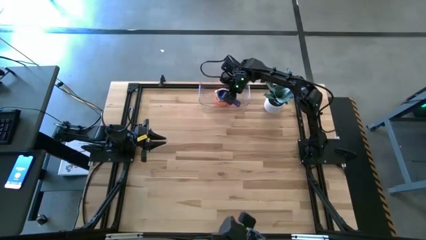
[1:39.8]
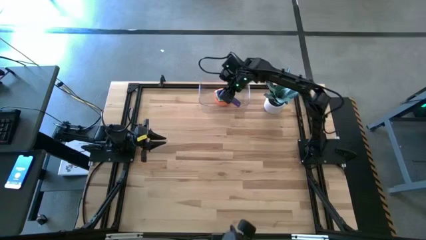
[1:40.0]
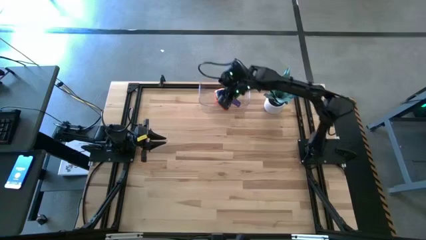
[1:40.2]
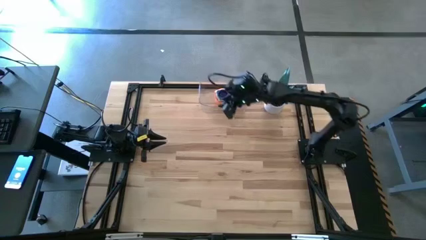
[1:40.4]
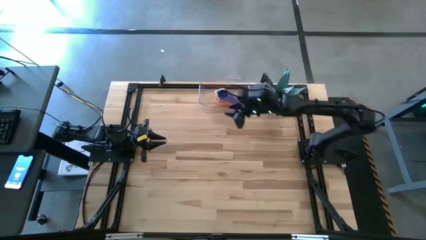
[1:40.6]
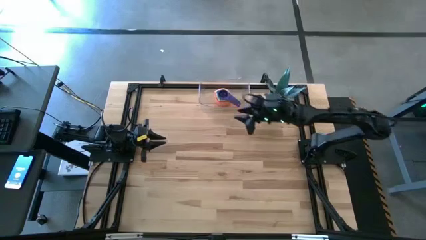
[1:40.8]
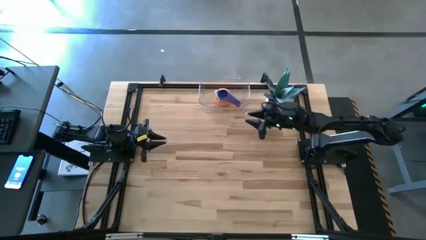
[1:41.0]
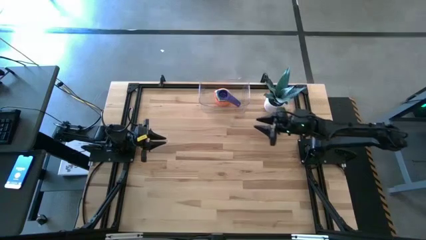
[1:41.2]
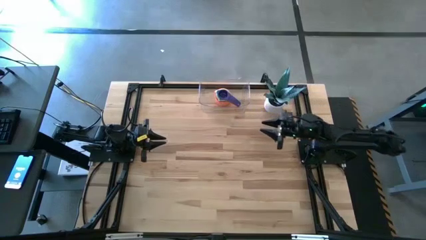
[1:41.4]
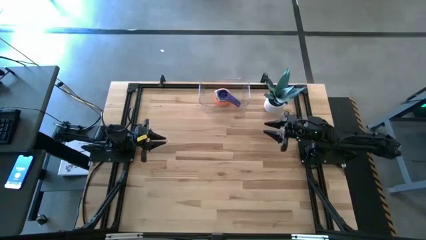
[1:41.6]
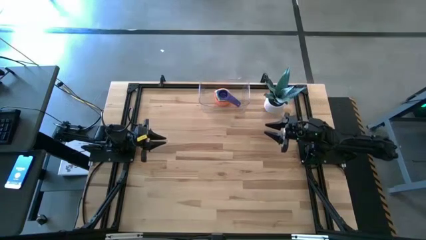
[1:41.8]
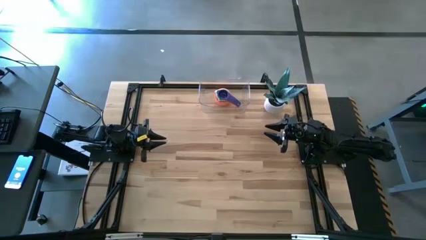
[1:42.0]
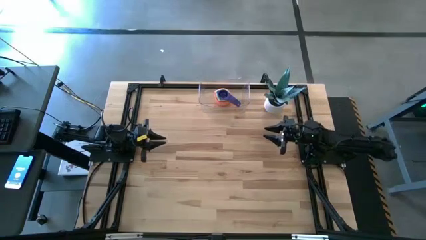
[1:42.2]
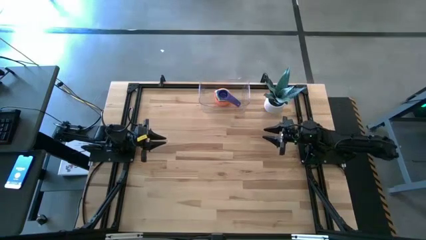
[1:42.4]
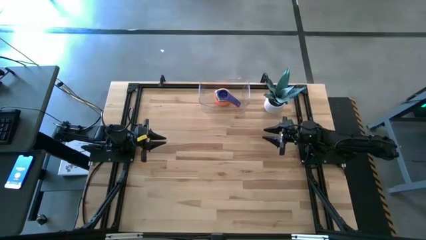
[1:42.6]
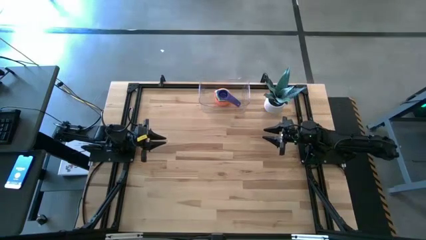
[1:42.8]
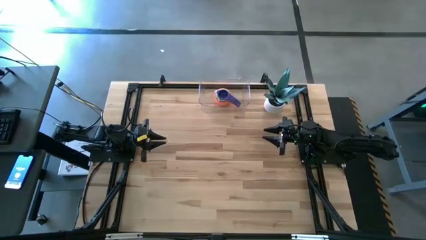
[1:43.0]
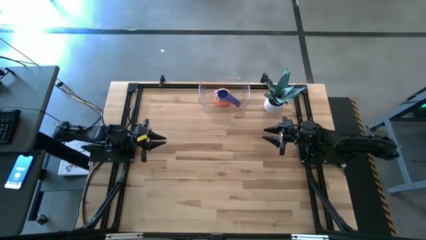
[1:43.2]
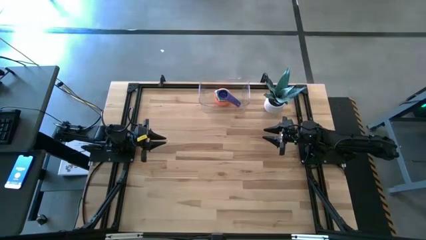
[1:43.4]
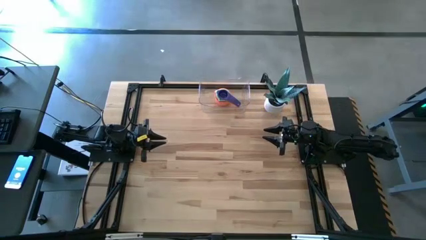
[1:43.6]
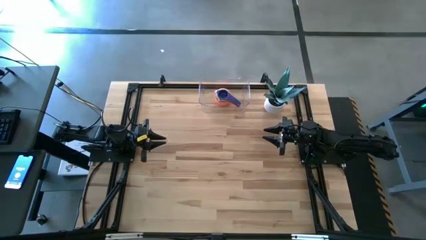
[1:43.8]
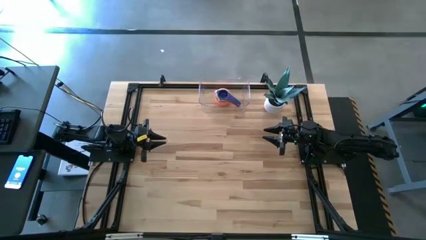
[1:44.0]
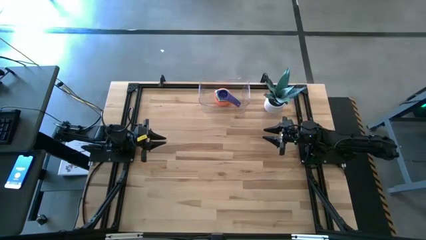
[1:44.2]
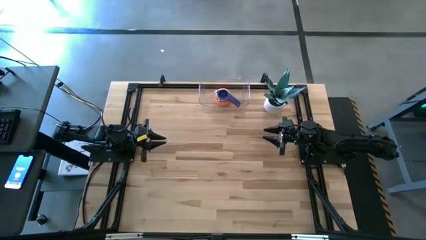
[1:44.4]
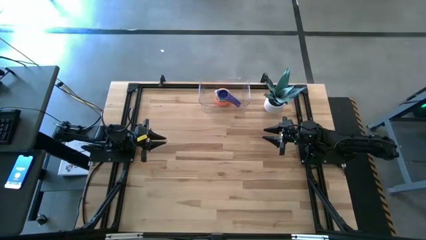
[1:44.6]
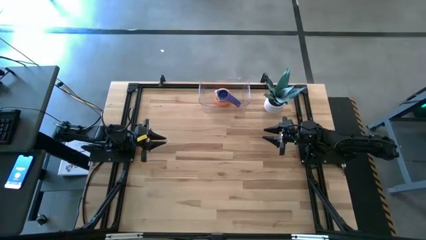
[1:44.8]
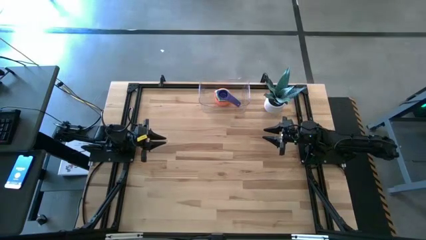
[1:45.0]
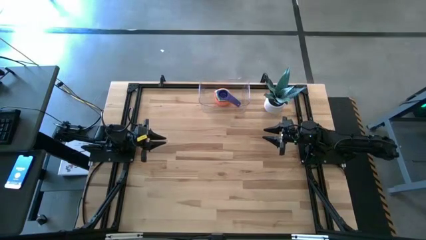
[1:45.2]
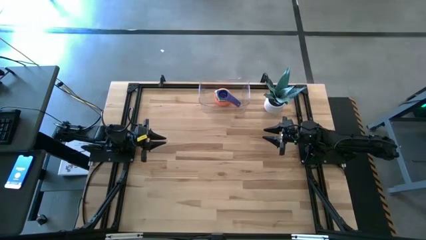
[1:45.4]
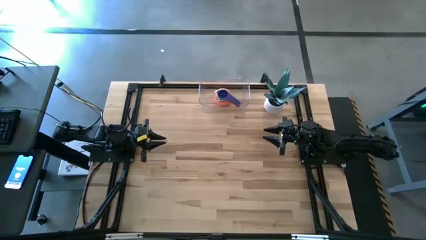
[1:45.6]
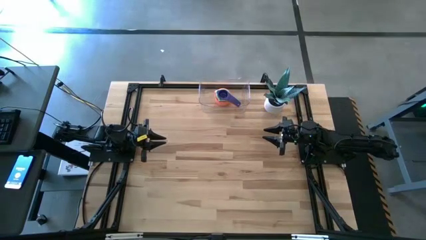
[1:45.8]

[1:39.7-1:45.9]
Task: Nest measuring cups in basket
Return to Home Position

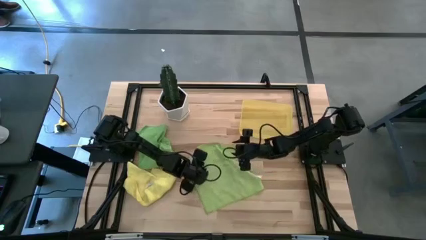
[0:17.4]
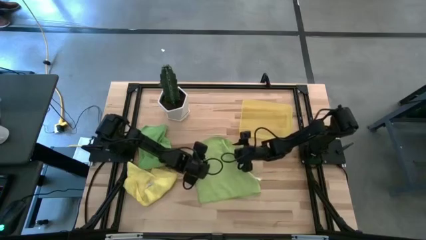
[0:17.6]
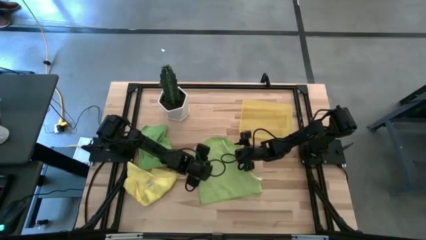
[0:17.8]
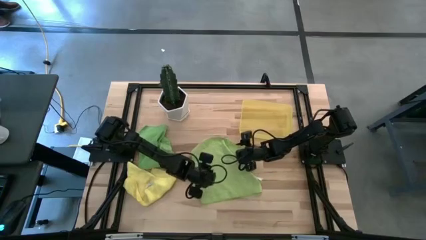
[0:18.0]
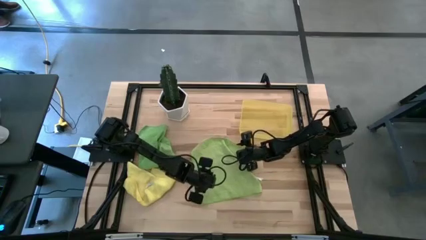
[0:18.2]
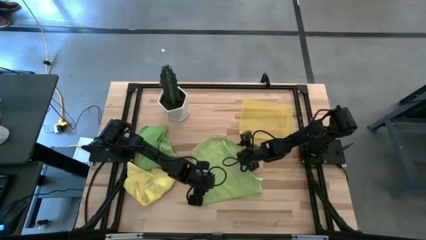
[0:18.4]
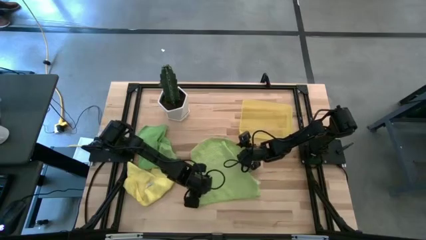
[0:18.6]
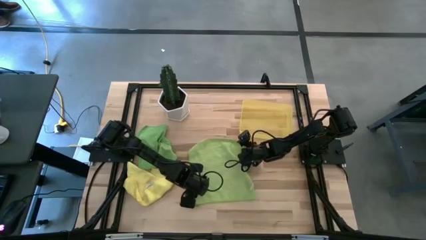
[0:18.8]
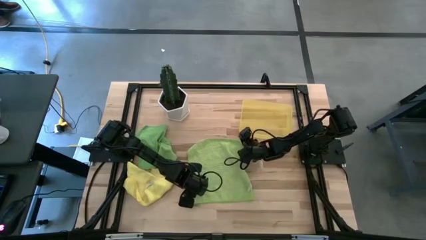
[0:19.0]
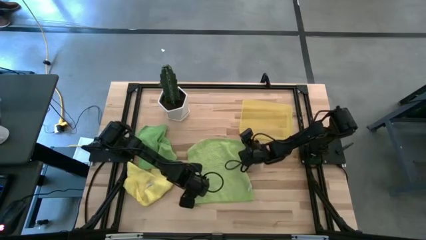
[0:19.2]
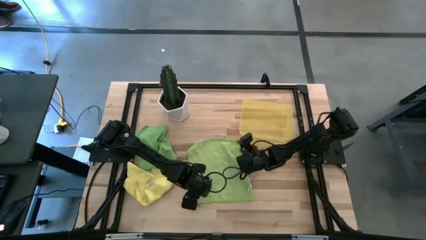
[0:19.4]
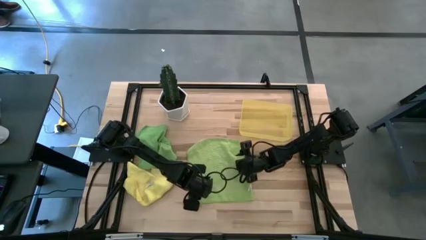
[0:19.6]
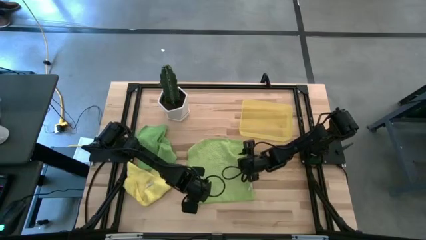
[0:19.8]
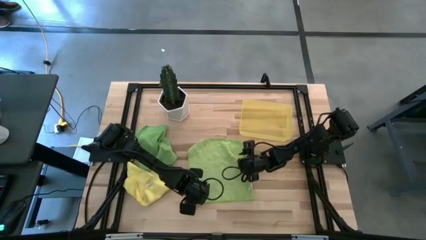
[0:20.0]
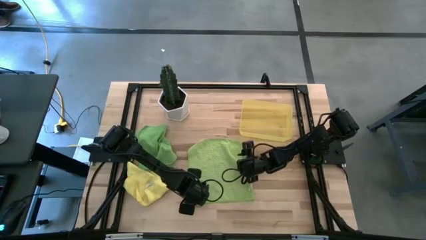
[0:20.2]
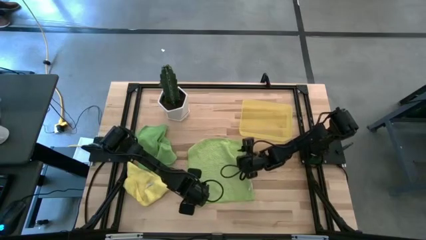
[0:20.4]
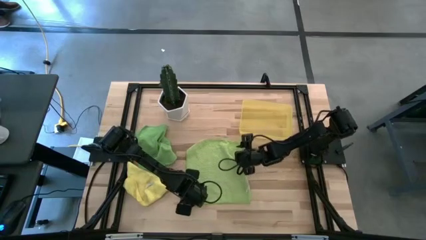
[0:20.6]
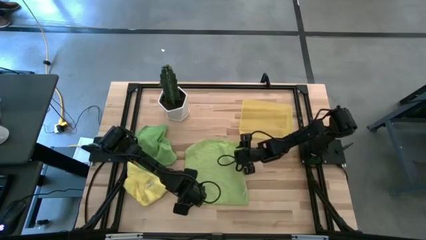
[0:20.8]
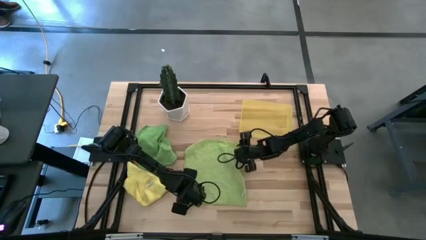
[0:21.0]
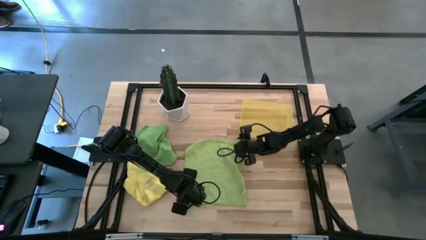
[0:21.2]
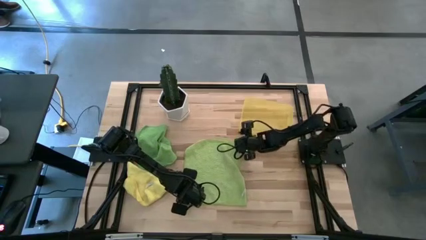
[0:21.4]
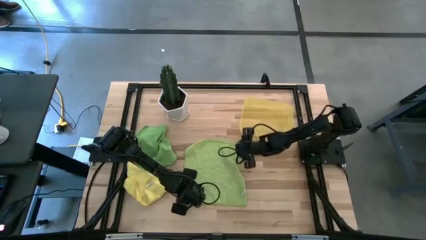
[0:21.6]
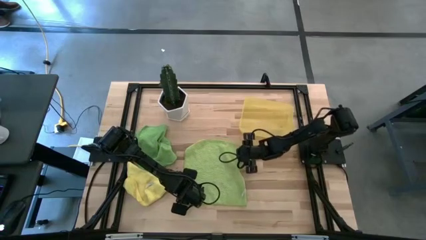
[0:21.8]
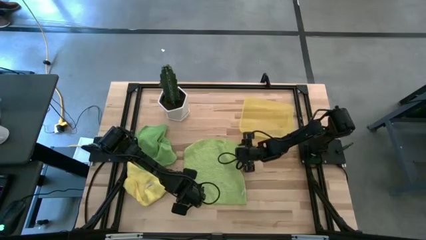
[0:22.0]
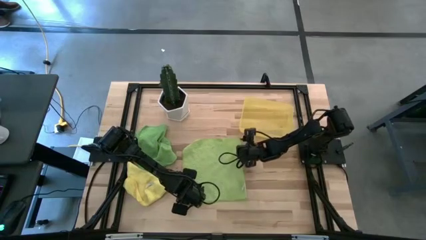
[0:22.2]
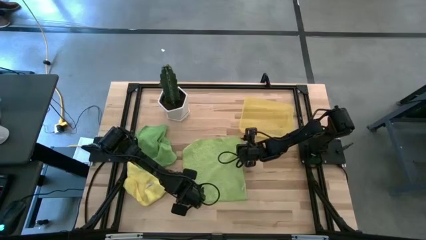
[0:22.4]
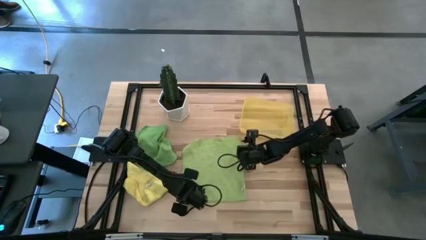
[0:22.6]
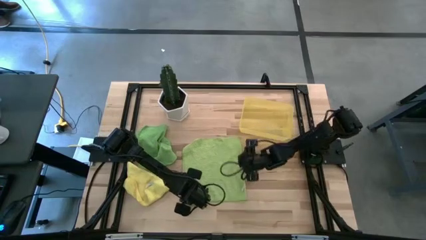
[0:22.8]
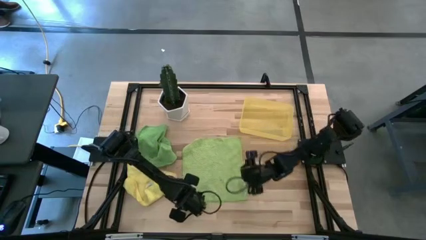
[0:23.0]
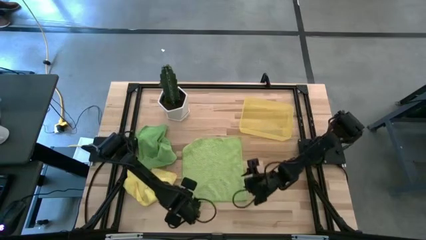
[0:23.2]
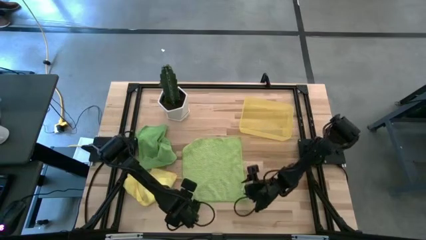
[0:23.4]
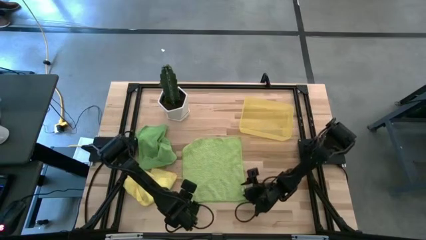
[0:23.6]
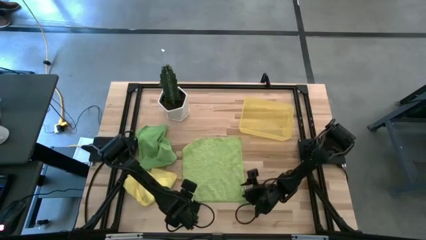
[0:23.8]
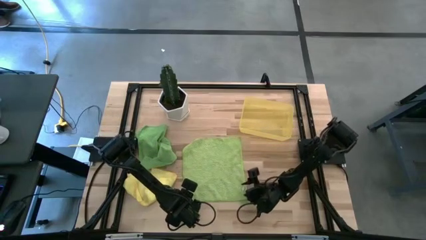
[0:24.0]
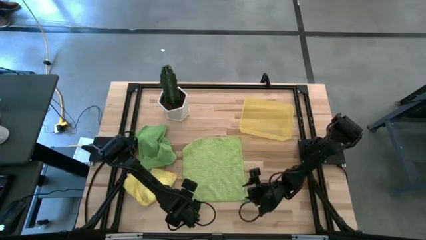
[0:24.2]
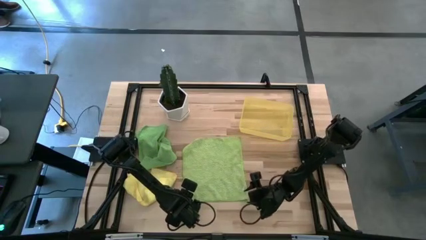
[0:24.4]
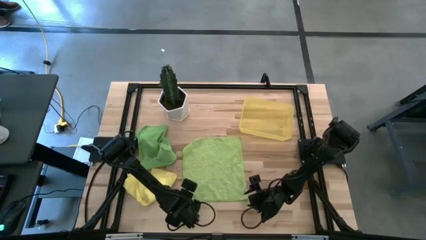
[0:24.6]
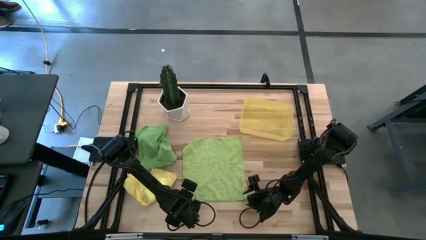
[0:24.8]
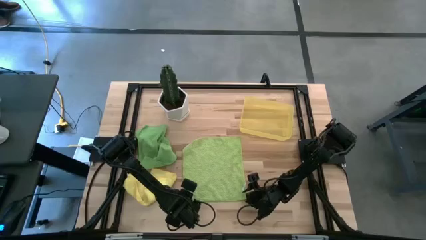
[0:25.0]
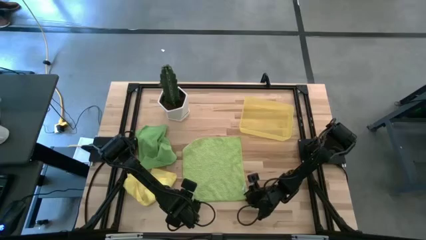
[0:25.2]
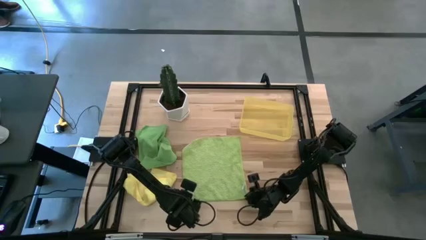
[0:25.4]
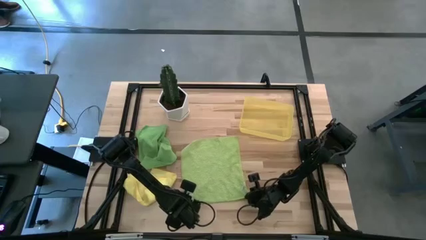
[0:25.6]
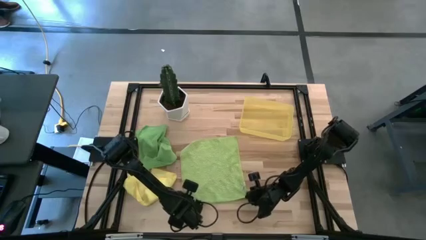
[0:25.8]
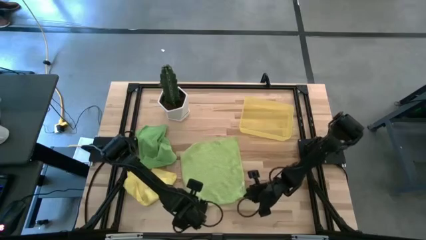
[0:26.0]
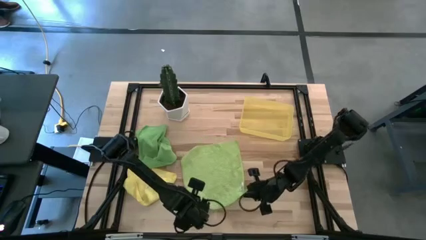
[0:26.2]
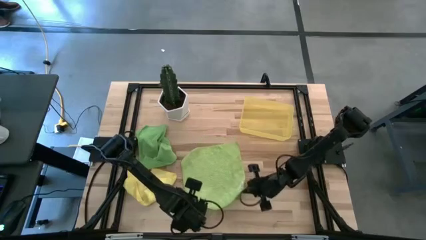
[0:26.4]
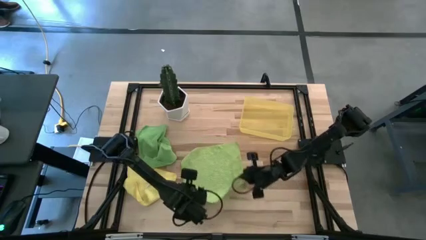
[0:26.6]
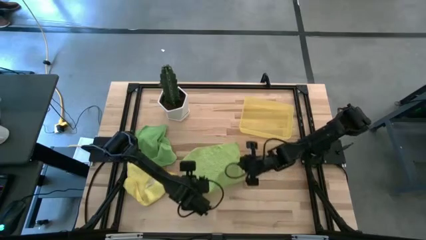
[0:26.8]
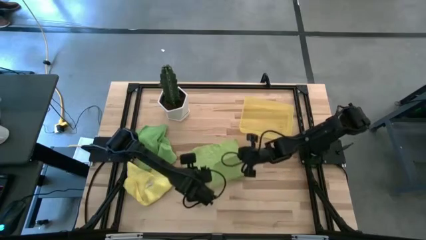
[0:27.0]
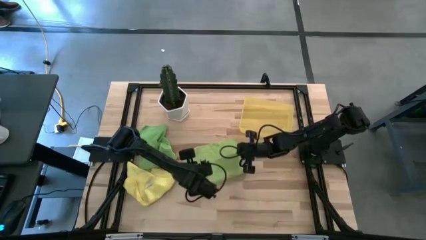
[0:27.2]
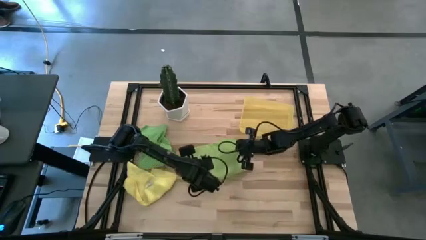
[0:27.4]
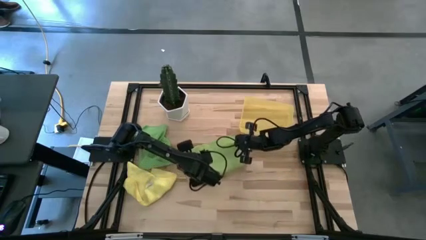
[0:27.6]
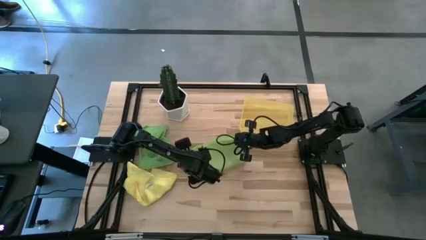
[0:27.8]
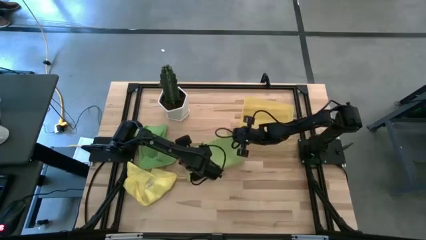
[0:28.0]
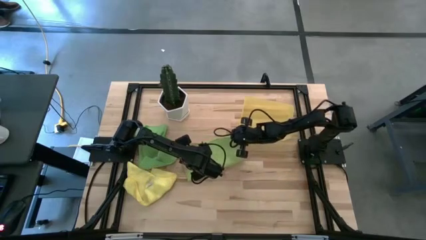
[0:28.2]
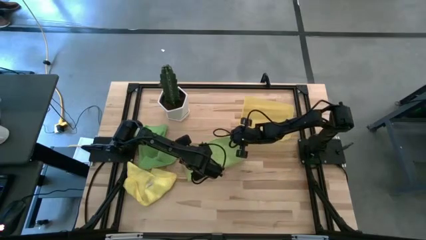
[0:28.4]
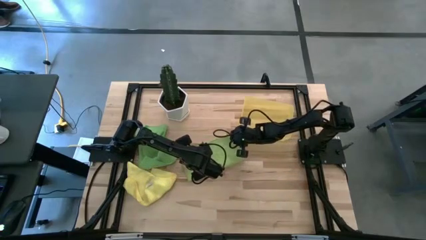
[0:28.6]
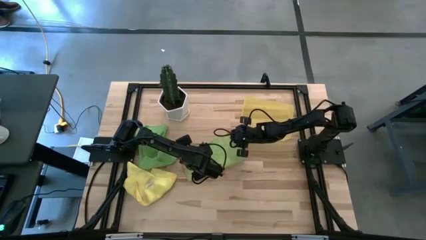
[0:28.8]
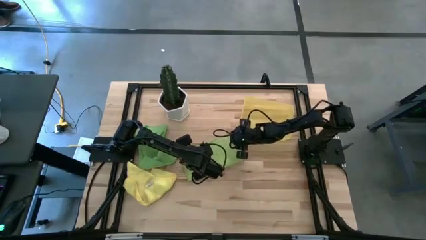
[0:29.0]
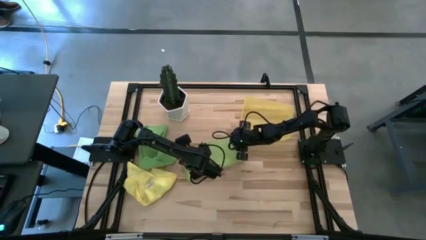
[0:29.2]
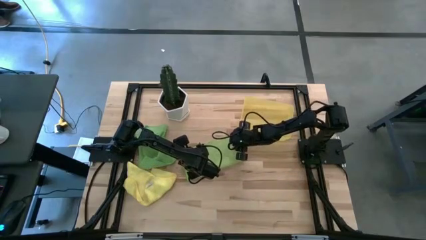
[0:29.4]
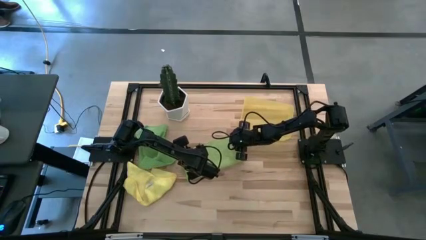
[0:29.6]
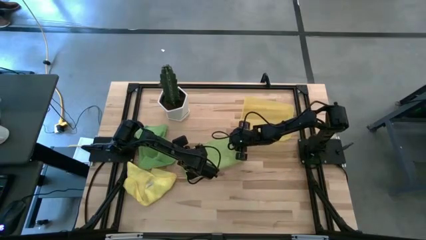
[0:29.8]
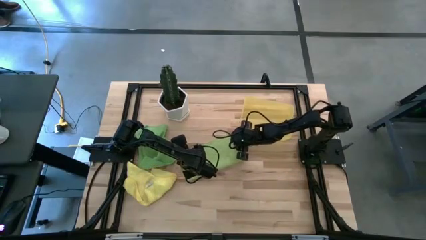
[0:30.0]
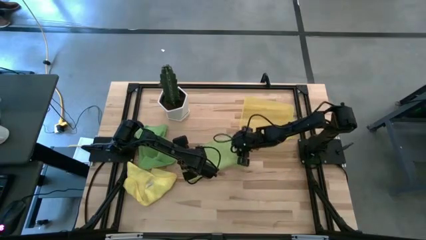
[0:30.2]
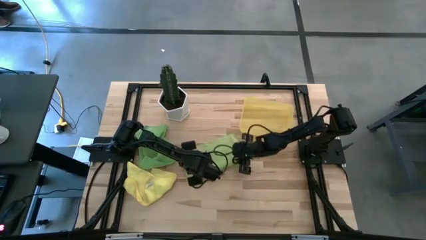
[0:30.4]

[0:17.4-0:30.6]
Task: Roll microfiber towels into tight, uniform cylinder then place into a basket
Fold the light green microfiber cloth
